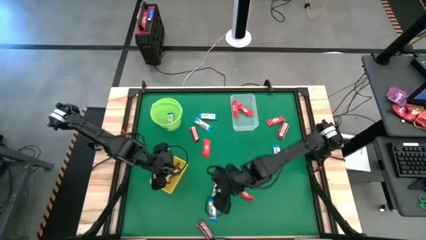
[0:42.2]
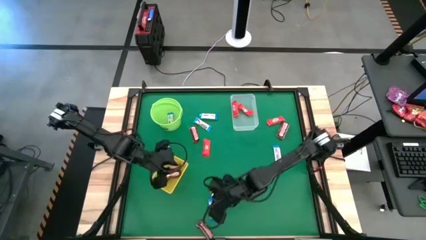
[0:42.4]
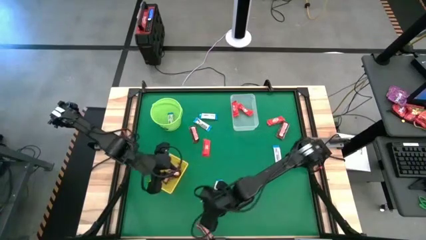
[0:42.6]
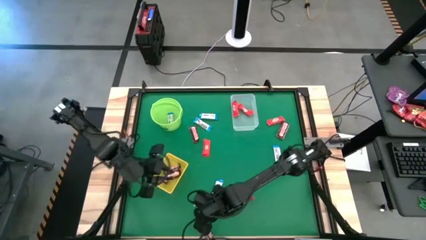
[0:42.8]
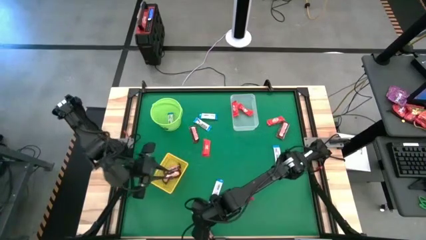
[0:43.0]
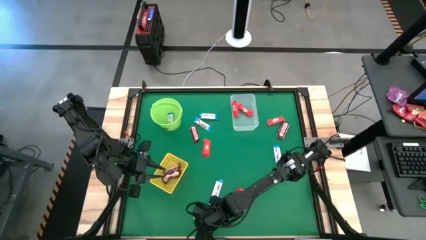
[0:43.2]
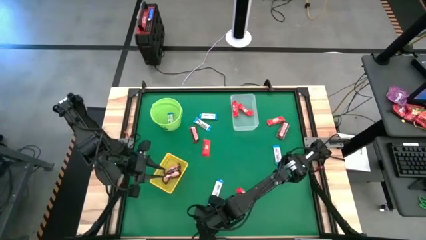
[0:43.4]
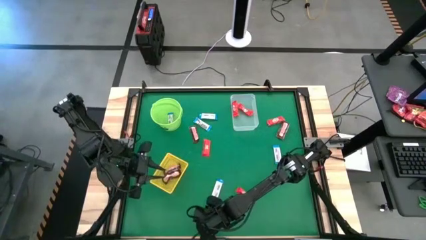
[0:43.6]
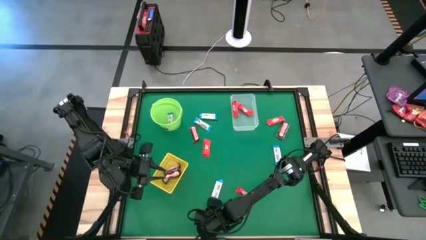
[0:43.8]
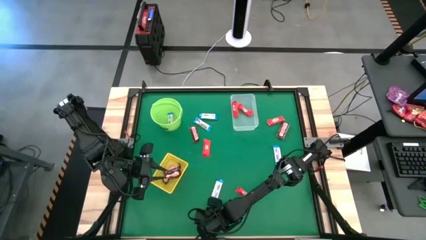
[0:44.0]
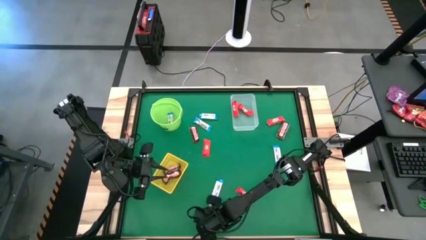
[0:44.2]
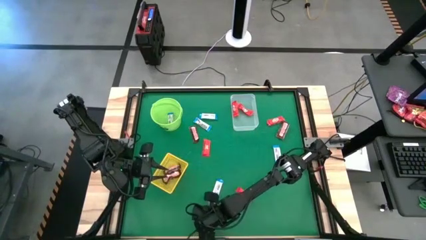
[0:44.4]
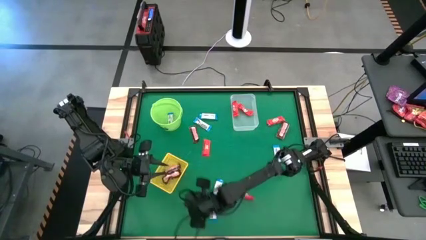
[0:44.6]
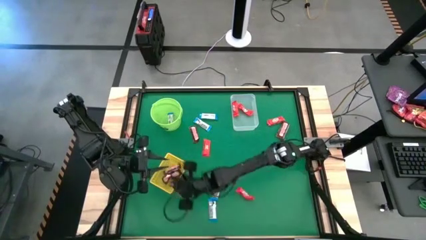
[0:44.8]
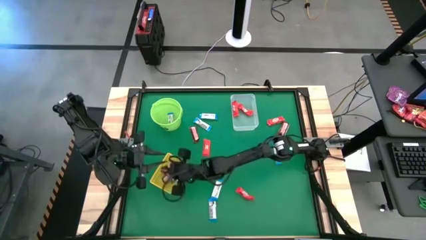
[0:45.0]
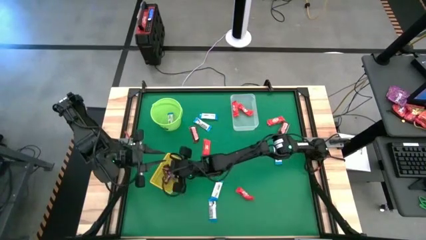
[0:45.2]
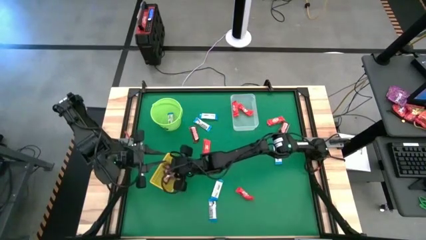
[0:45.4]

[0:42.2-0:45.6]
Task: Sort candy by brand, put in halloween buckets
Put the brown chocolate into the yellow bin

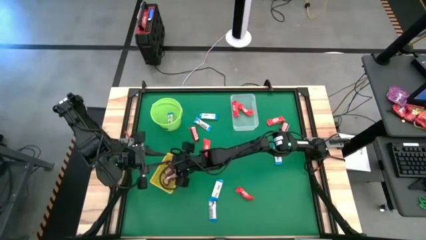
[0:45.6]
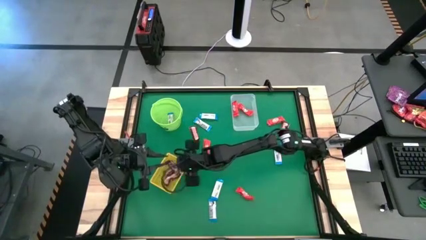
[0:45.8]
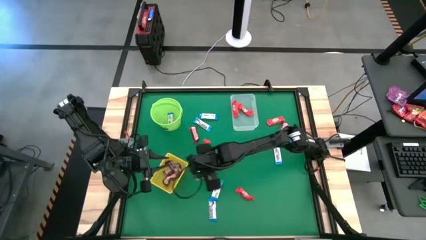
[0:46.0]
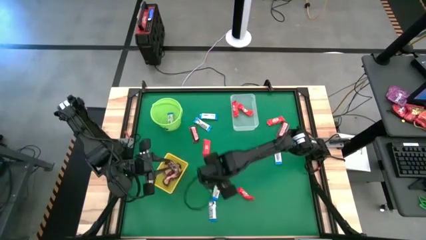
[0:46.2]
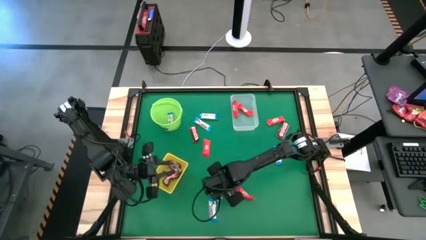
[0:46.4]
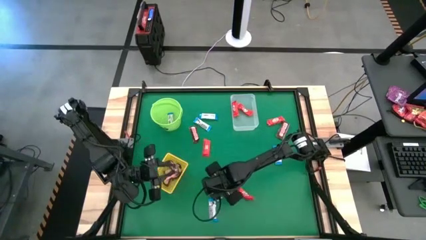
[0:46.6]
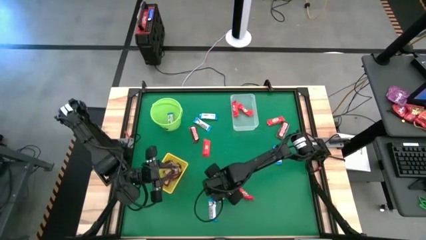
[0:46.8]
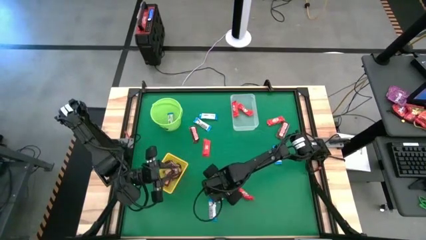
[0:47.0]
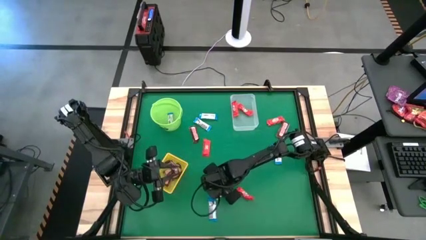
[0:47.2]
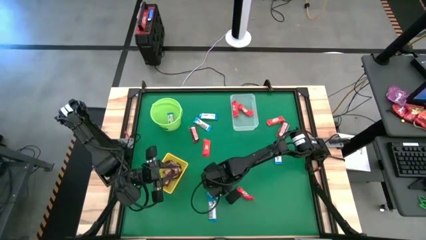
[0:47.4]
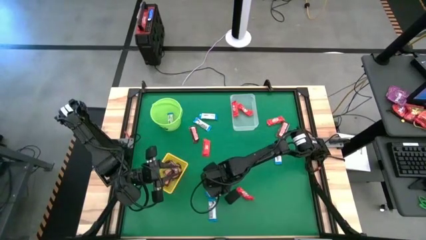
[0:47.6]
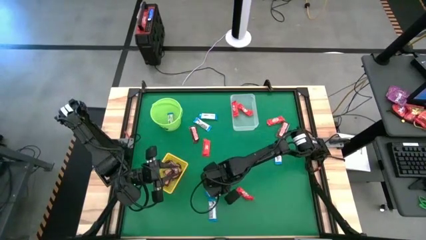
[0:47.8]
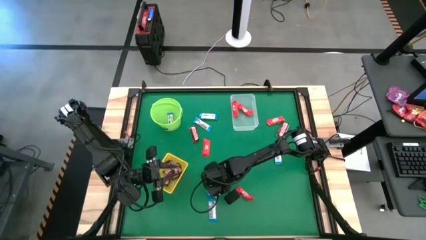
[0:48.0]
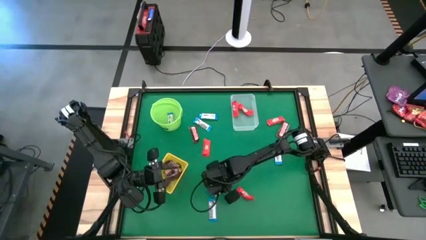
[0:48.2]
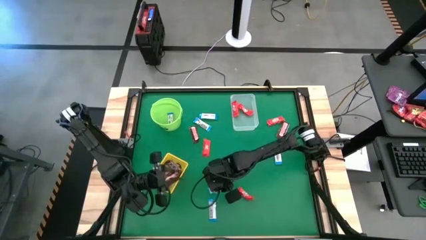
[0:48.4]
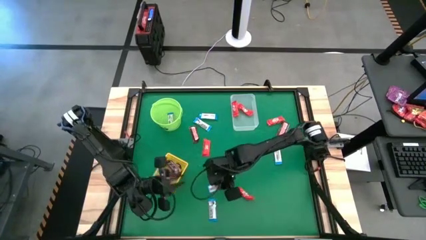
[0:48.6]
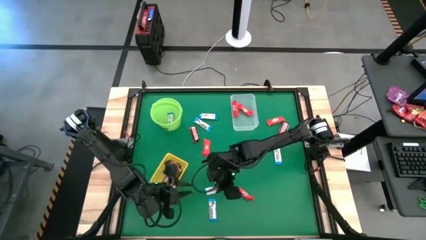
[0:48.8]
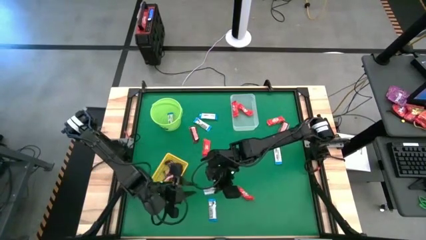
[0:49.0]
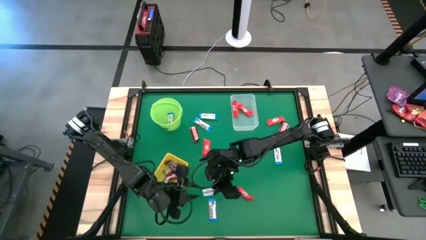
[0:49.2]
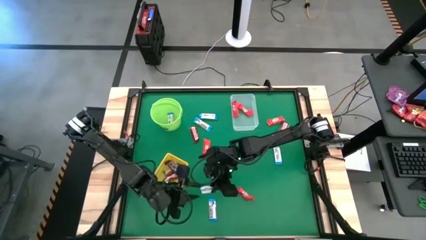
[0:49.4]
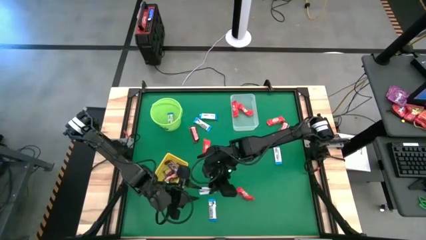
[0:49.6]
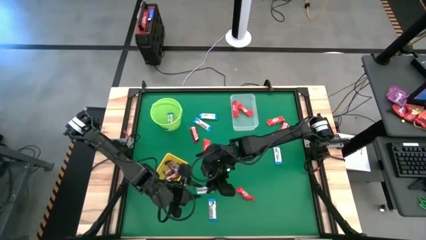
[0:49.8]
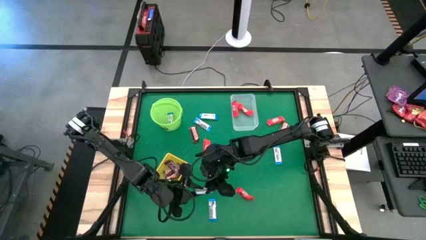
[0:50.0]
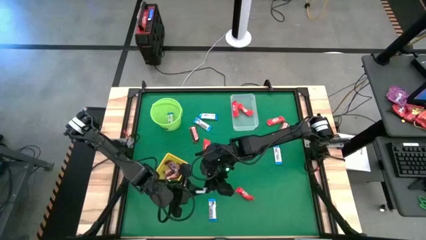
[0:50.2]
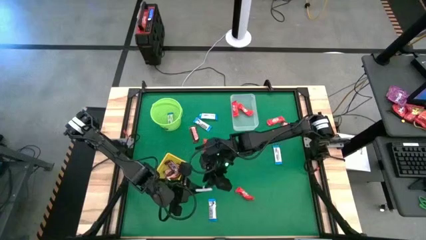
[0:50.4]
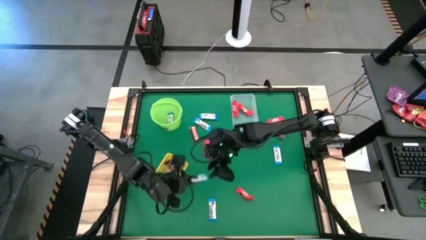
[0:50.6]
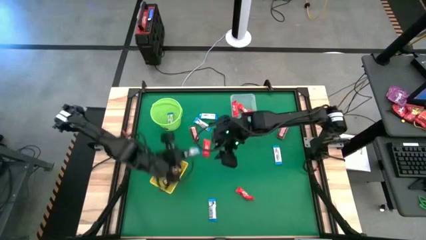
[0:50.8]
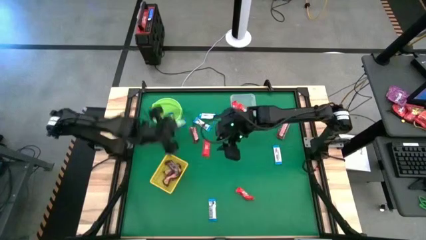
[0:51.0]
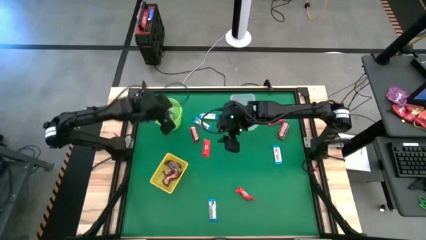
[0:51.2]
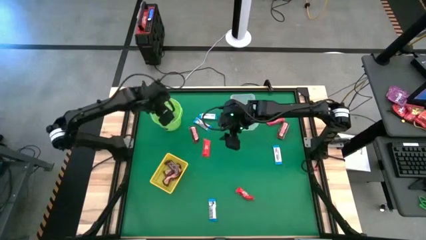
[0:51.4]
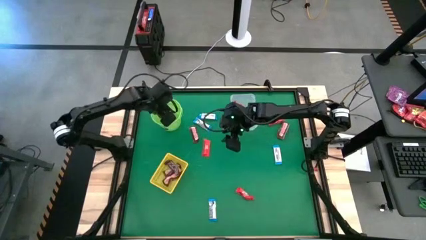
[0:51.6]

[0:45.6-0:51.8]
Put the white chocolate into the green bucket

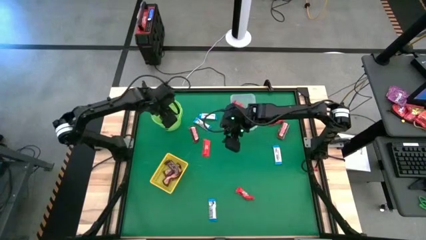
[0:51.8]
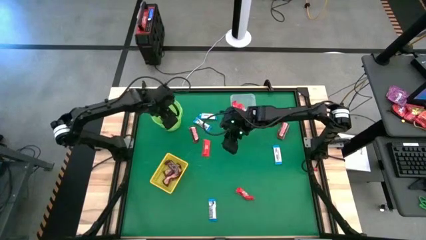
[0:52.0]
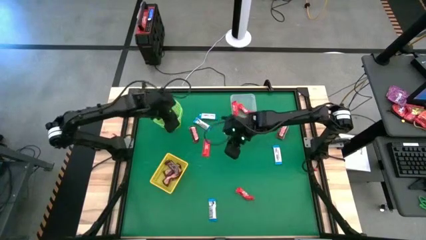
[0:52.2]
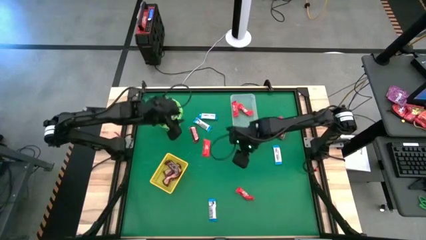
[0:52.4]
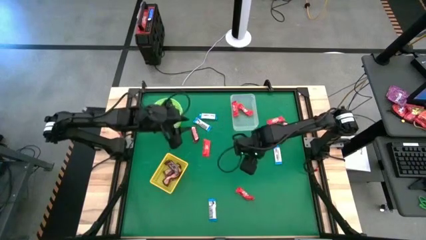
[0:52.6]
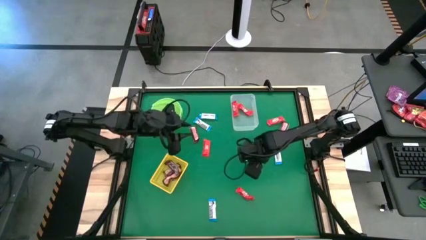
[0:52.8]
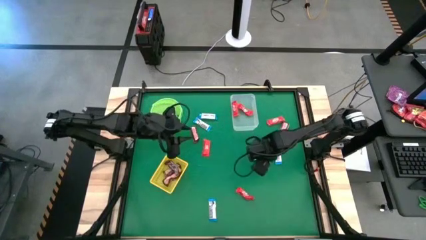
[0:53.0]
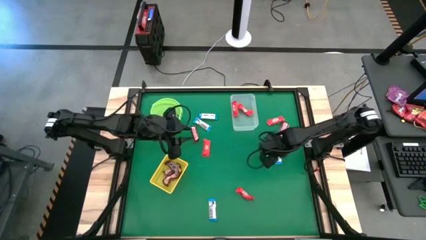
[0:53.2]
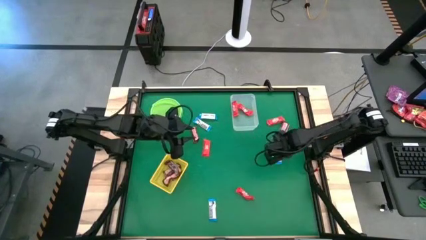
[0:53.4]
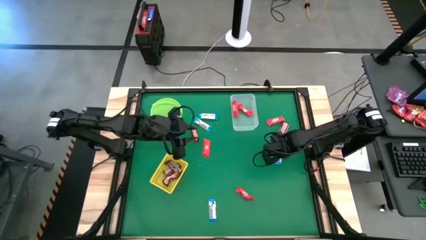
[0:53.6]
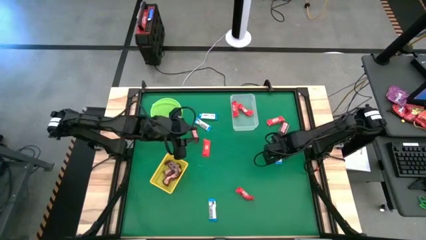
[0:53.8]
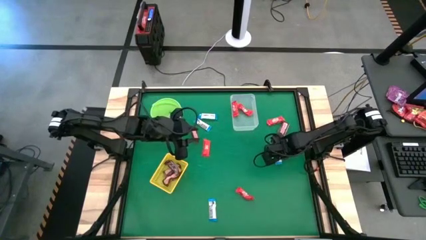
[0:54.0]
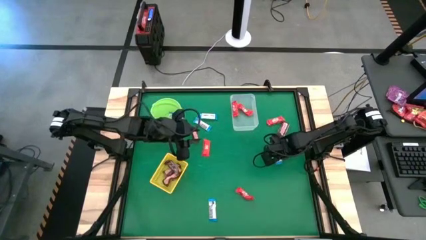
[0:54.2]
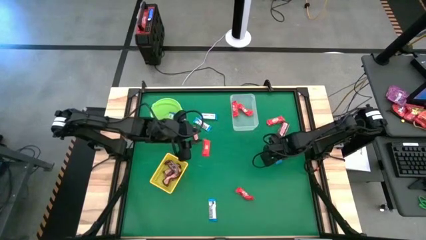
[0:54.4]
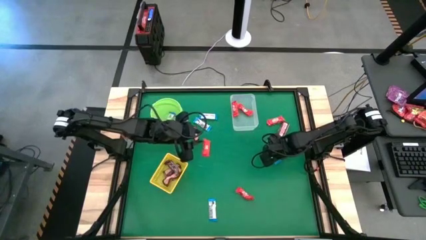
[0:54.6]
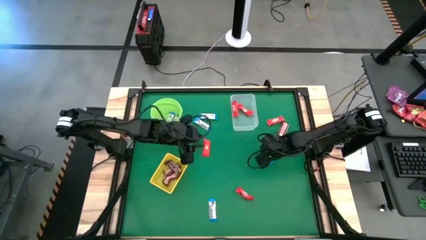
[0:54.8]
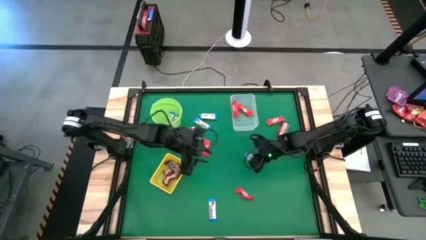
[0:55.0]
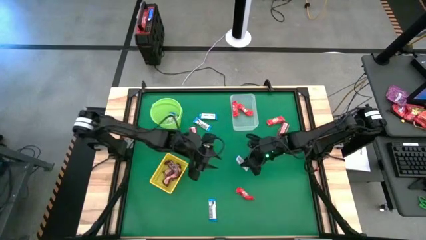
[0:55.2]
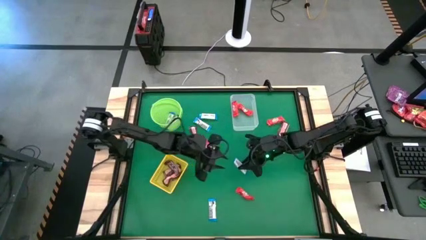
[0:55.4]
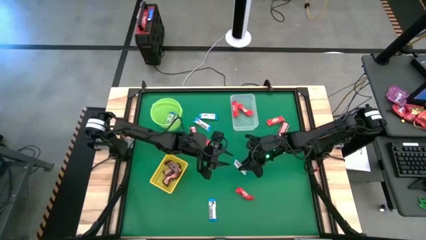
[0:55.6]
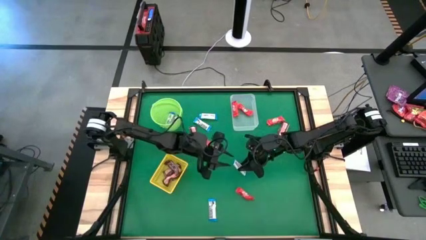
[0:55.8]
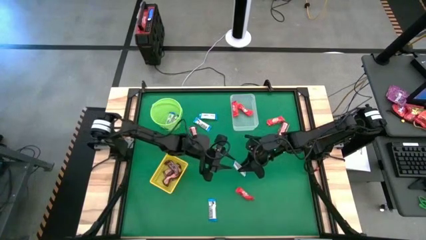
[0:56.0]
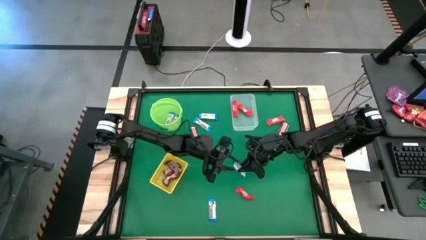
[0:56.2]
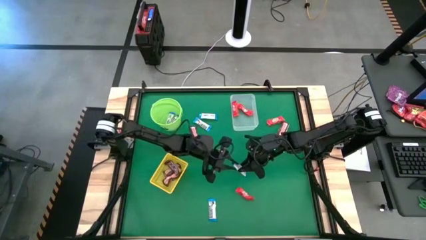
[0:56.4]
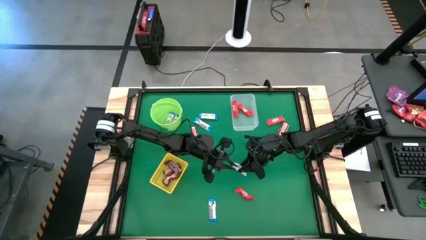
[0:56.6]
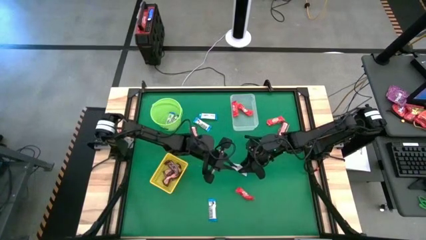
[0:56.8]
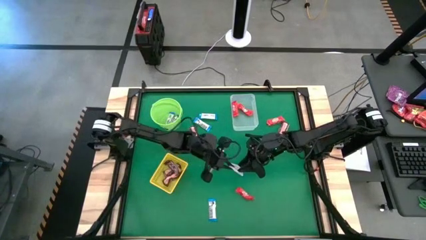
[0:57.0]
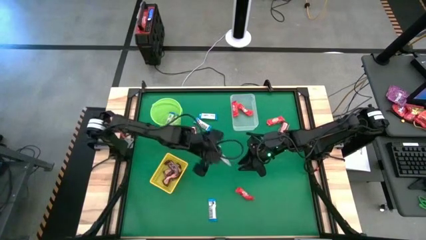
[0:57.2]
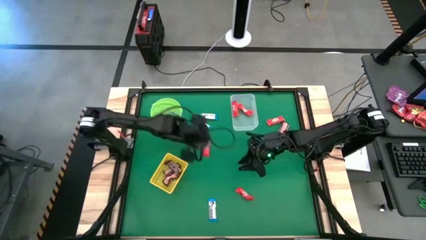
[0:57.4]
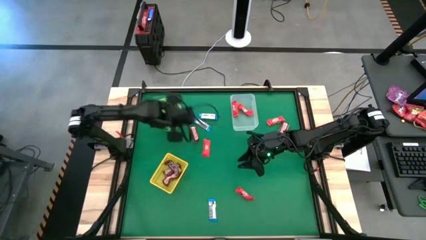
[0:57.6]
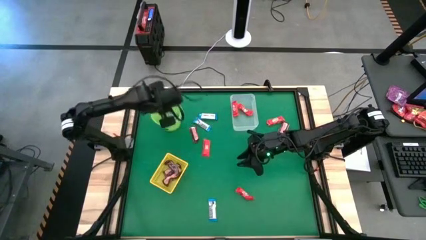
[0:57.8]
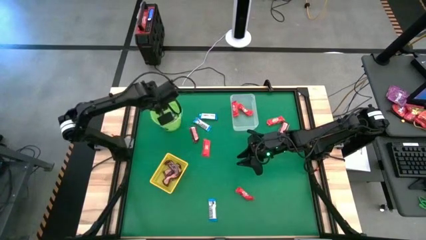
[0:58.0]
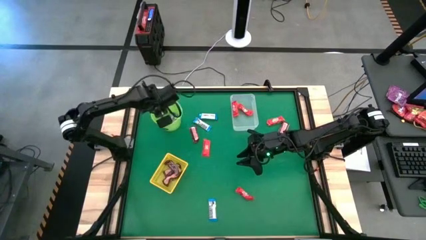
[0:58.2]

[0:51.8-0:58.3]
Put the white chocolate into the green bucket

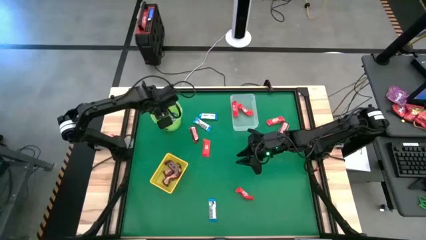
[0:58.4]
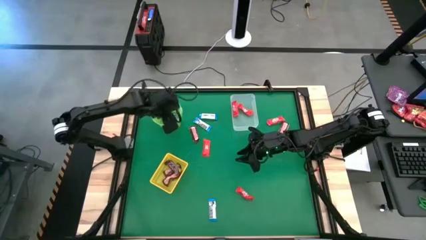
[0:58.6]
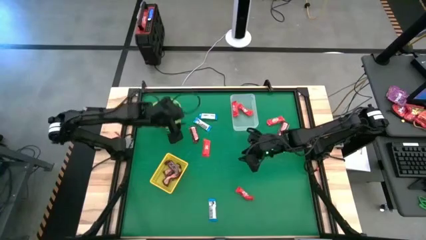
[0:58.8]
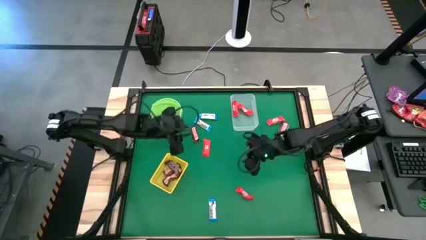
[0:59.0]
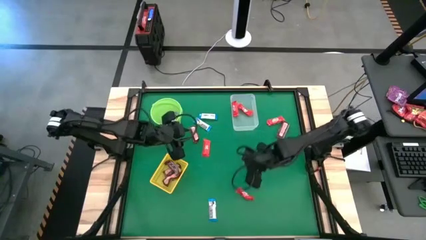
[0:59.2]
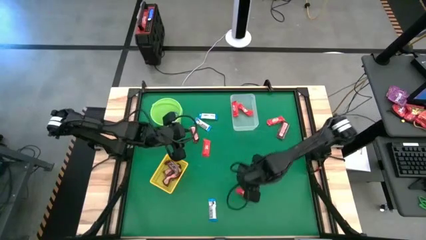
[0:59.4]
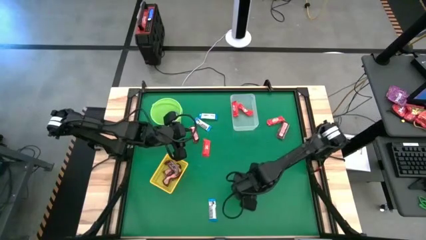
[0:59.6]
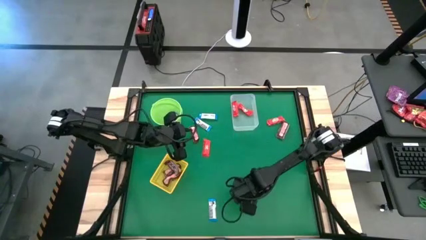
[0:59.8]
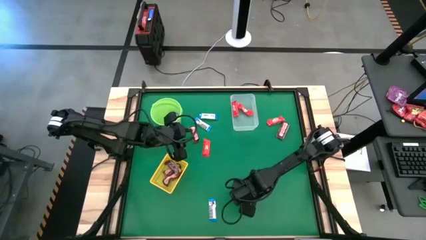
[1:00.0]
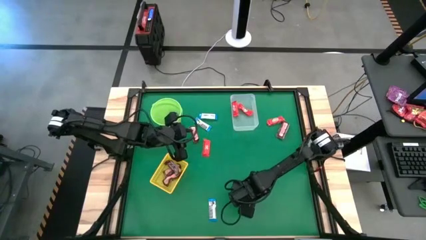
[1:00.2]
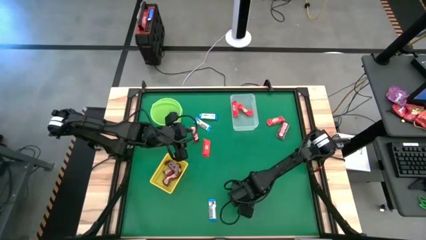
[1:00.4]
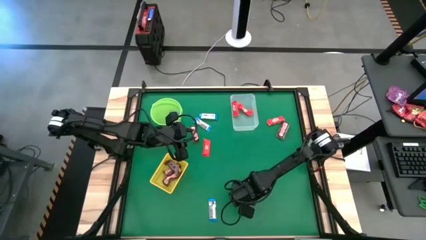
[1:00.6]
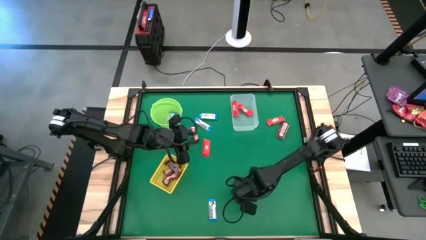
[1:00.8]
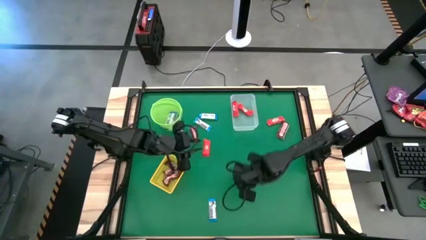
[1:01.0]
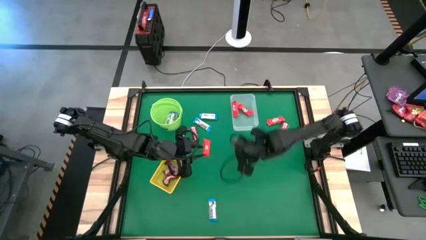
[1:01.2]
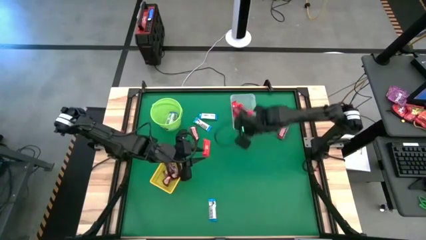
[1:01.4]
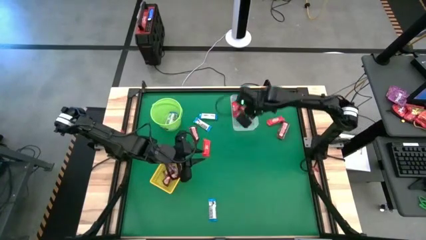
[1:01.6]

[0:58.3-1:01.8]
Put the red chocolate into the transparent bin
